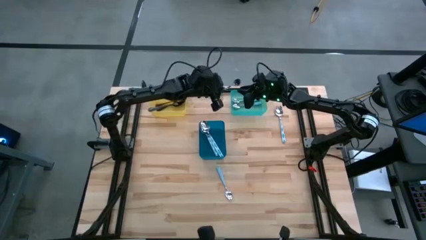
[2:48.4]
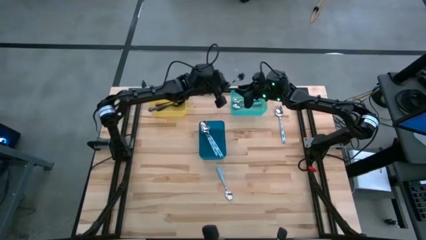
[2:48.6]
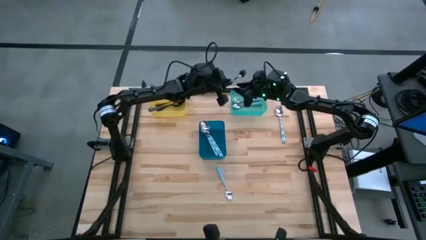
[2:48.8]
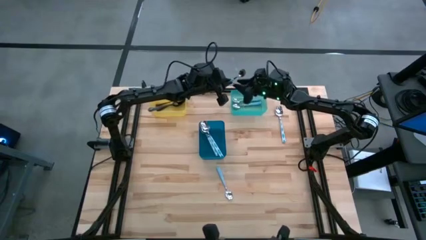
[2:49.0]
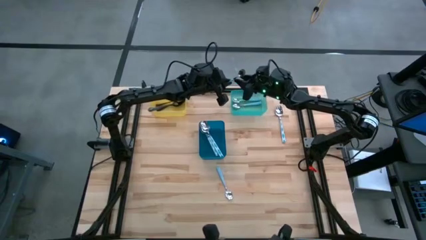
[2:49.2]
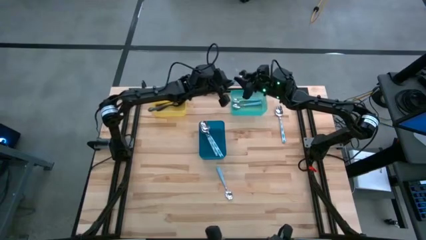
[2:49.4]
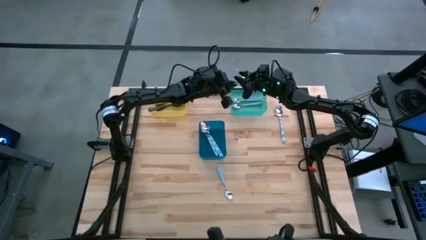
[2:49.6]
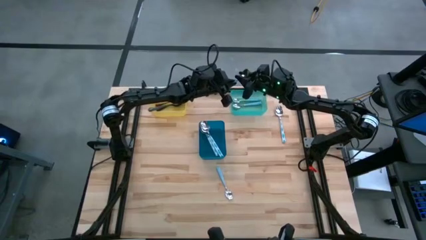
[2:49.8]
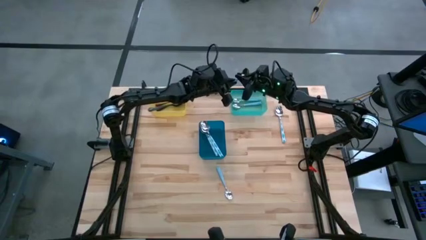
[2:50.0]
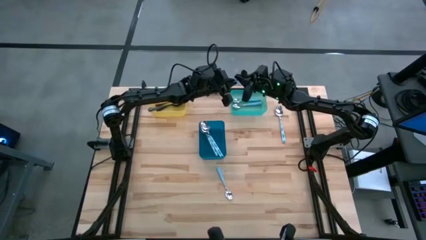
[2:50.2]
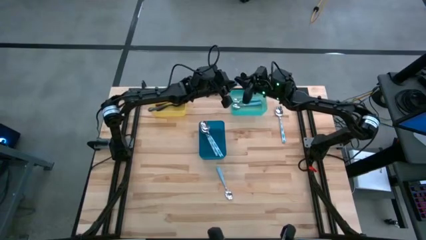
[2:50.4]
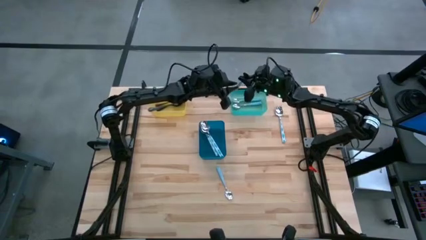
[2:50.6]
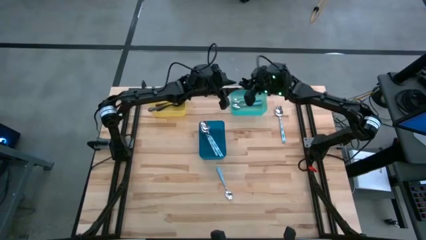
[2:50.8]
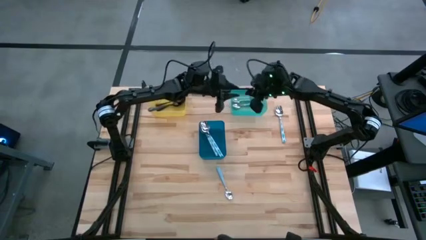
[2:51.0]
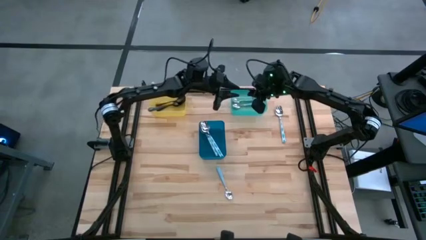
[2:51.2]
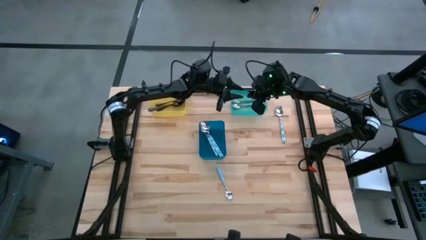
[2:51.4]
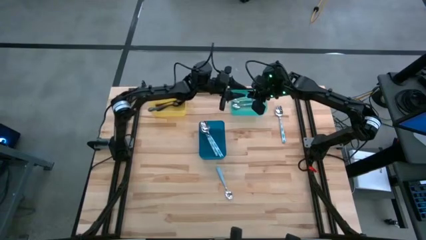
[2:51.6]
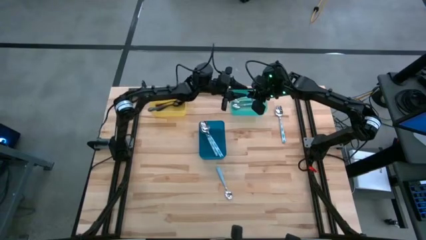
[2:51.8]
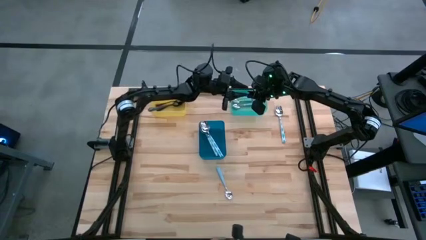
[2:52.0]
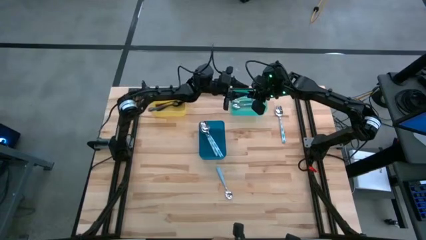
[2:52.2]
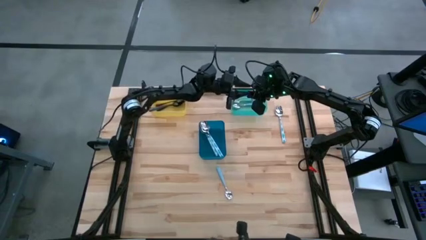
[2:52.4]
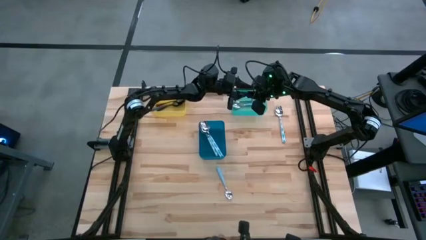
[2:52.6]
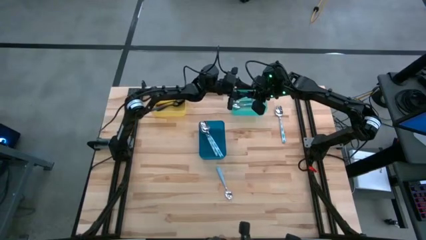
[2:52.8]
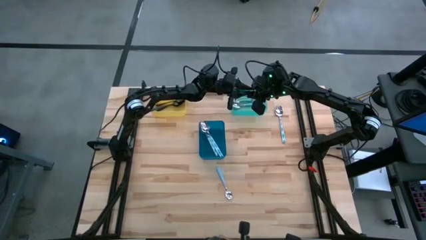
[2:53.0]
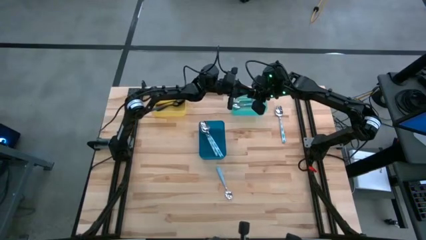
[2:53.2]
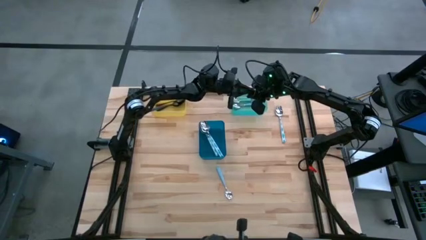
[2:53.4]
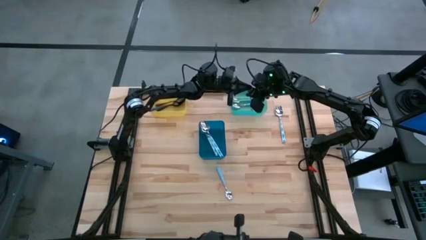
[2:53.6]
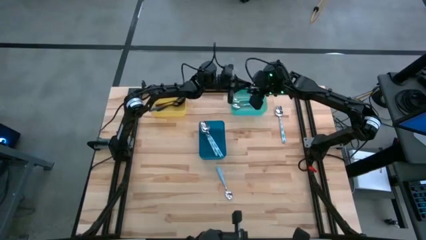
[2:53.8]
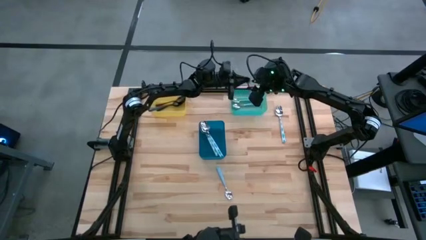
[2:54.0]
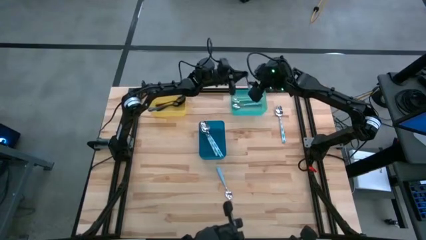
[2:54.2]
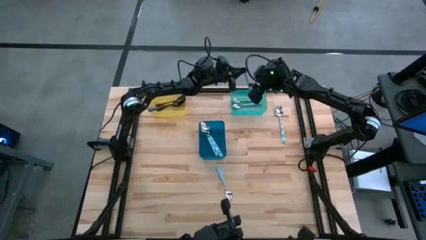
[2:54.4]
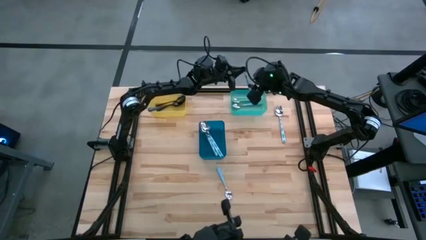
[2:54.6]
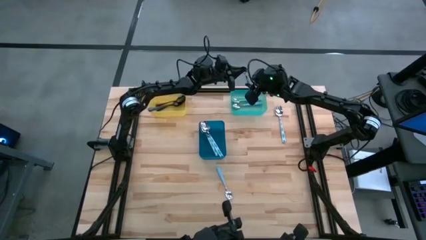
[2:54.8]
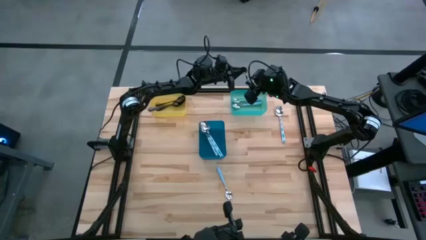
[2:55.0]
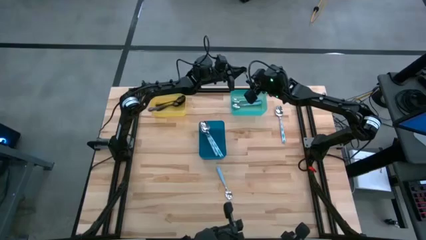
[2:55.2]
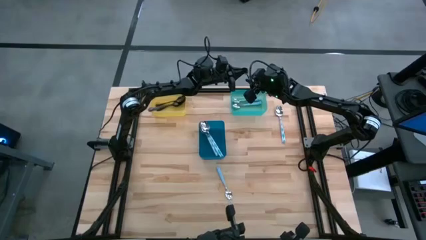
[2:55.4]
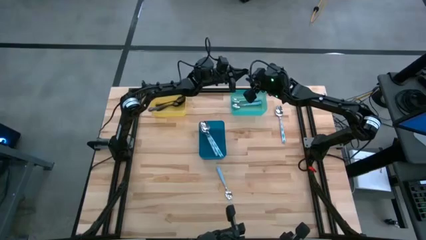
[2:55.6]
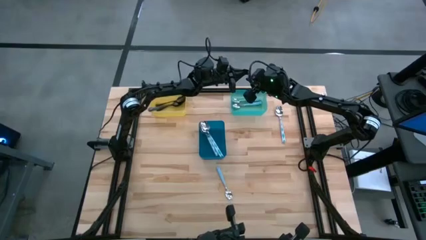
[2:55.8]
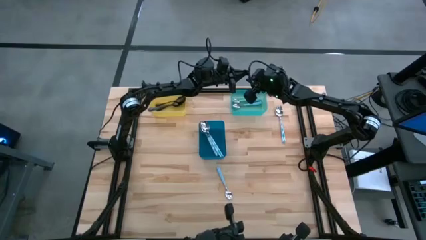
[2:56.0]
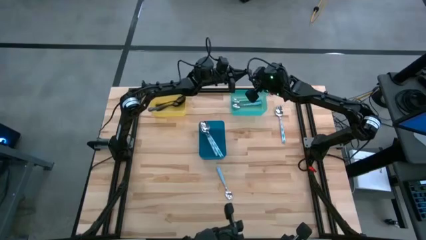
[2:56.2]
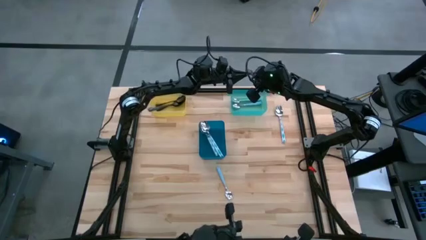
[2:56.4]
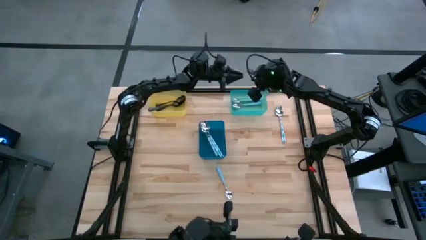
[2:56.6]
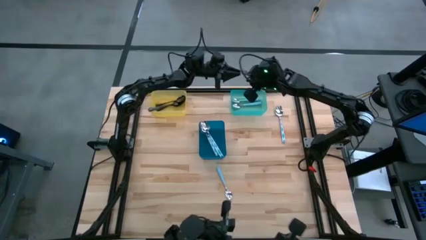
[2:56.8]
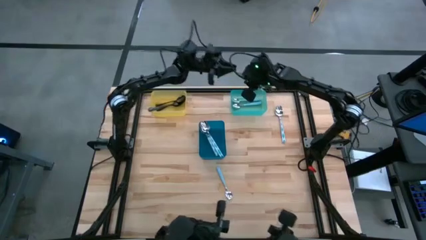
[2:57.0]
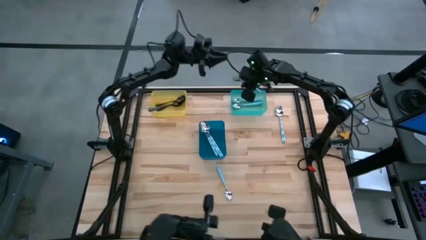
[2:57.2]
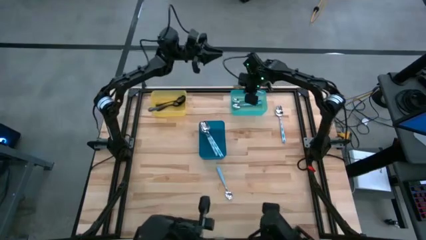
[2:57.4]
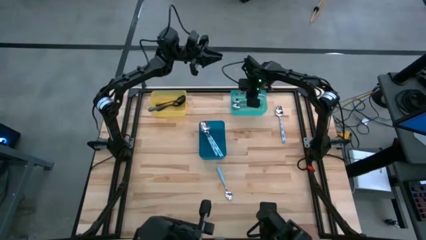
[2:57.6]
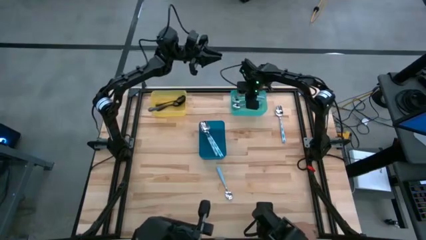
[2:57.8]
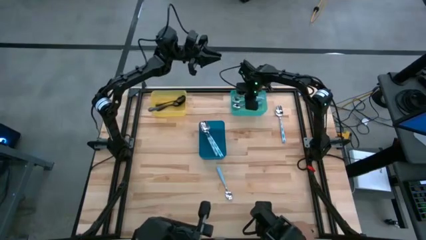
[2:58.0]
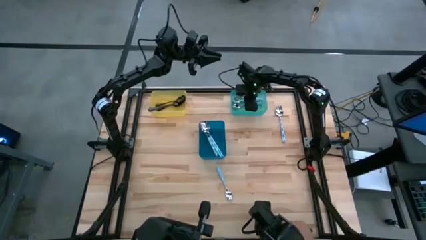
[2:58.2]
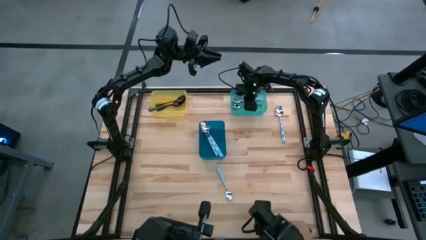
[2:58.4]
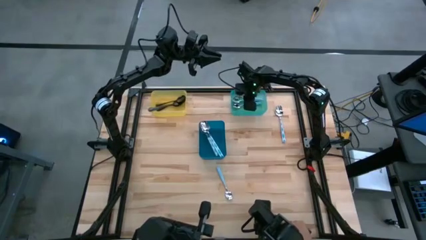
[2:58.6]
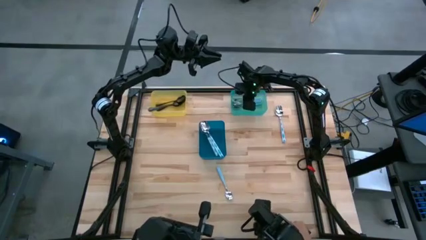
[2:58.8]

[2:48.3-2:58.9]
Task: Sort silverware by color (type)
Put the light blue spoon into the light blue bin

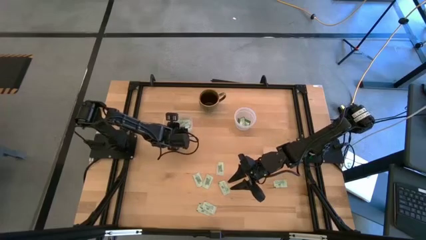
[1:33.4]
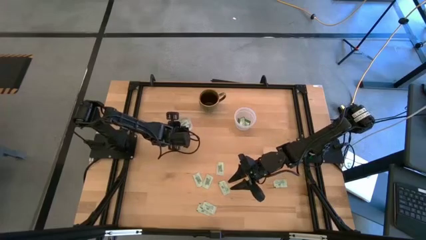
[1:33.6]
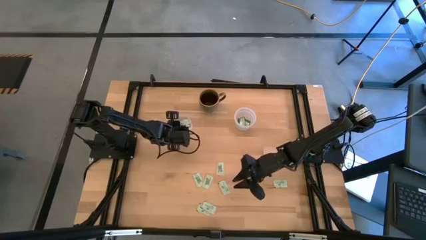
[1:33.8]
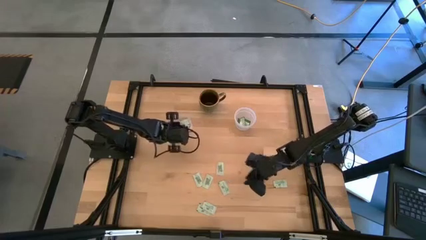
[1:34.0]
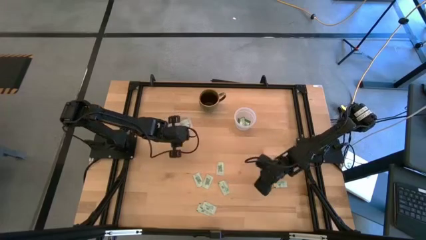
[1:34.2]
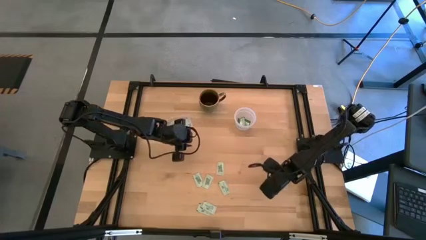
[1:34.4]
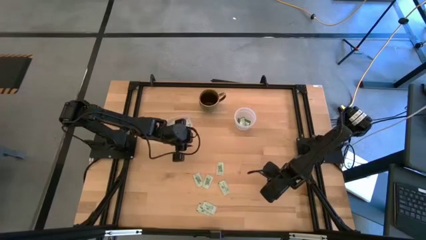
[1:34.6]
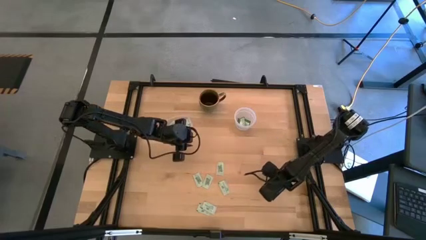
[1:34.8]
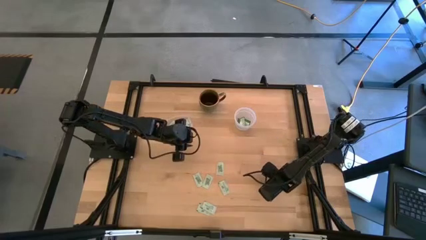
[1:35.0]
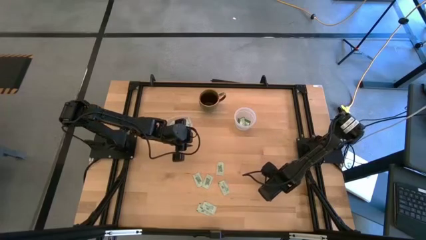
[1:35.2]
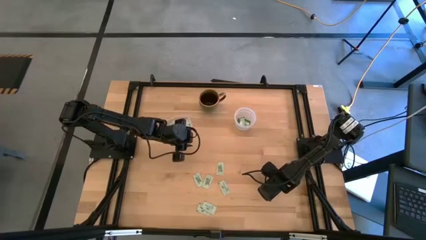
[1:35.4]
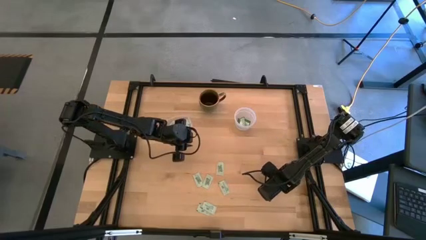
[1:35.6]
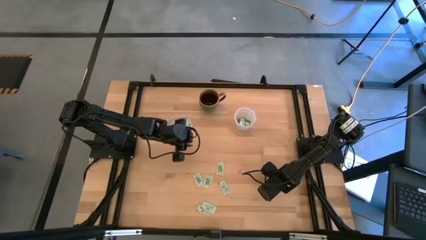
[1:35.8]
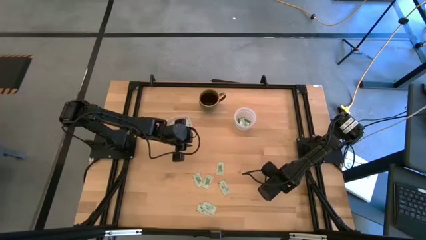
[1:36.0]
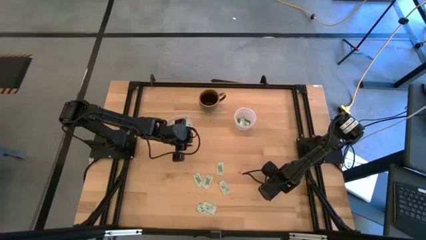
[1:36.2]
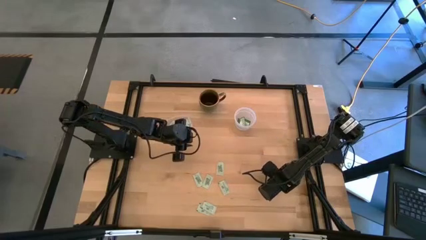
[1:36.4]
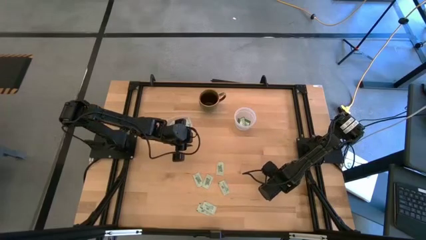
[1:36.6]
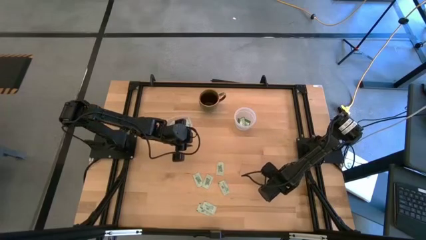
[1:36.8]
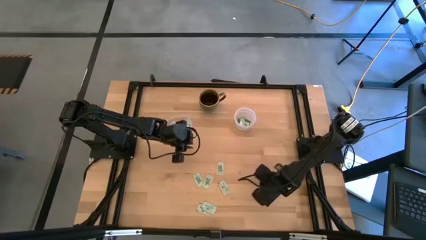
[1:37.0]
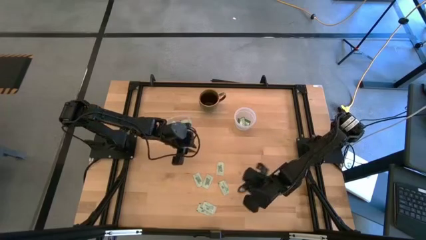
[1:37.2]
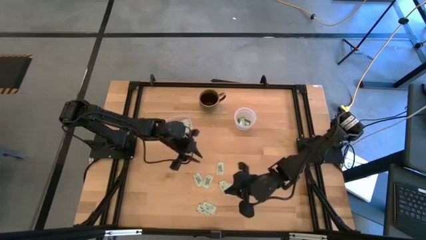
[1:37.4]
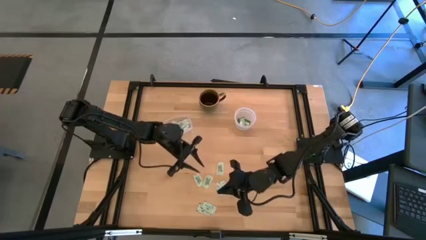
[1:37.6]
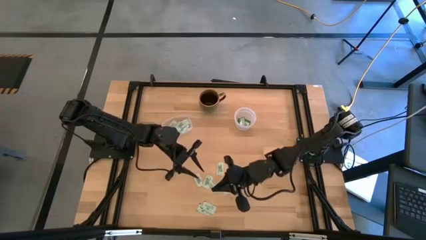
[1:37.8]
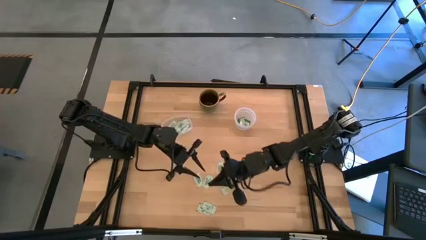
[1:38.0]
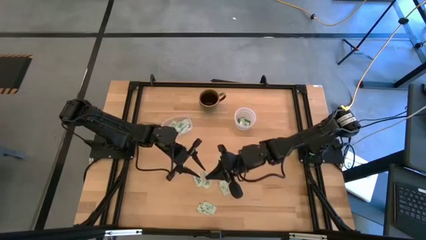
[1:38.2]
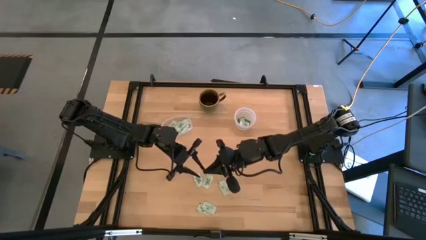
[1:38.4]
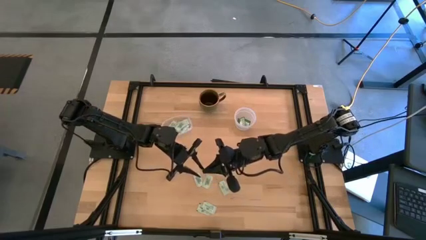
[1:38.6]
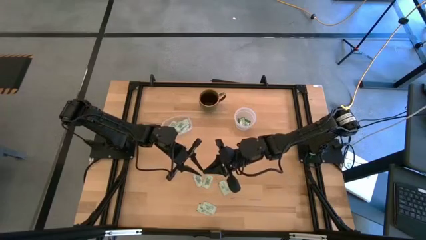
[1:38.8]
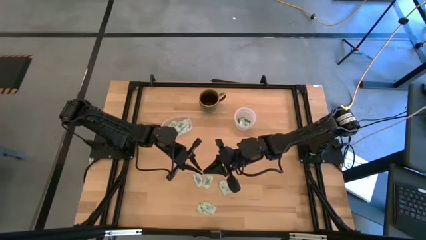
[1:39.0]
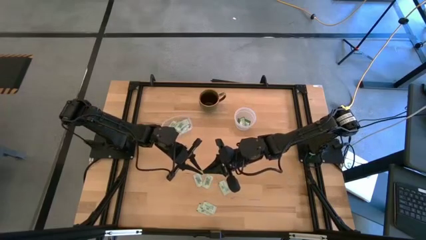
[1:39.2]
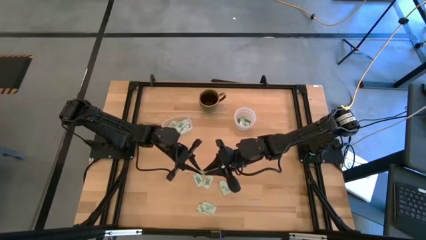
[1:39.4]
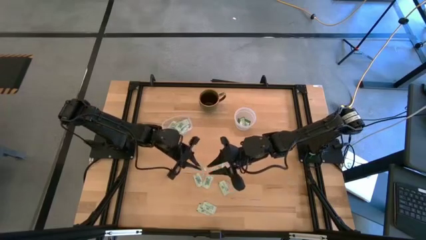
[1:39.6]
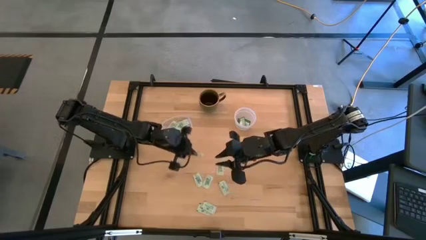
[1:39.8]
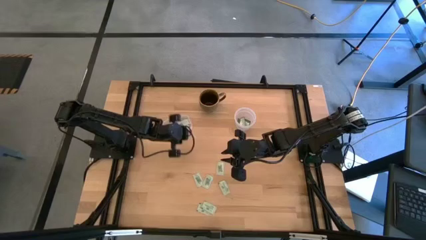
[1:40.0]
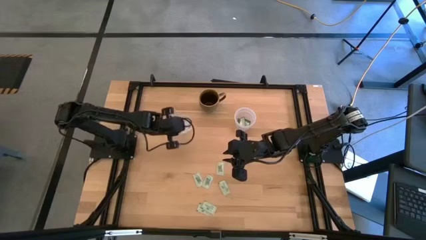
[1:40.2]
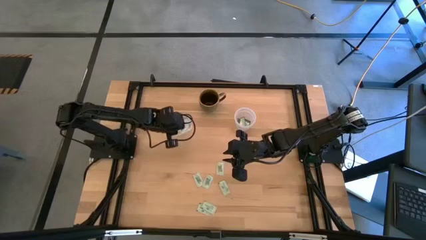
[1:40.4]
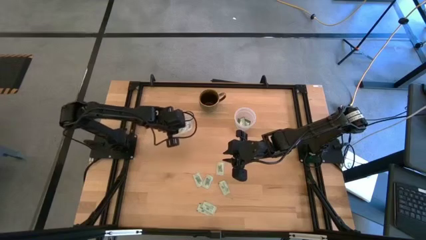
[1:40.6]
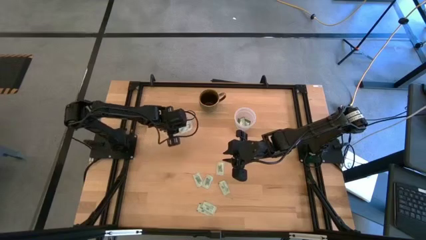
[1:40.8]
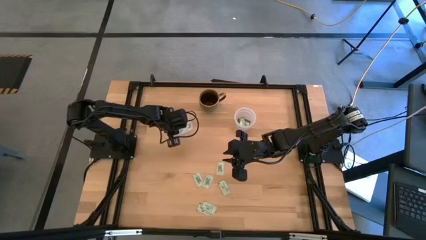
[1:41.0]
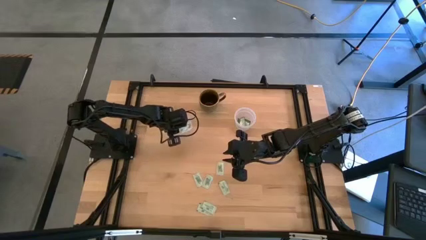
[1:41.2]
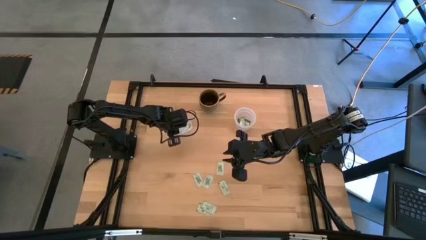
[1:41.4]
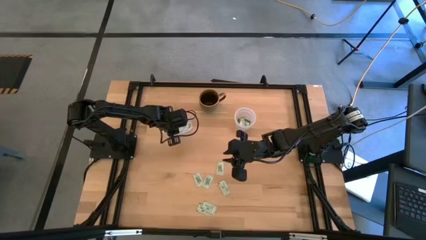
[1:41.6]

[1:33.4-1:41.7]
Task: Pick and place Stevia / Truvia into bins
Put the light green stevia packet into the left transparent container
